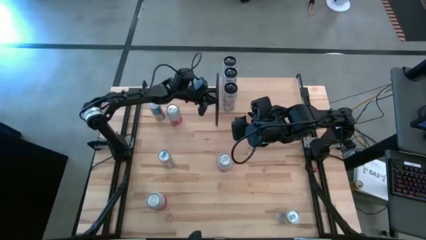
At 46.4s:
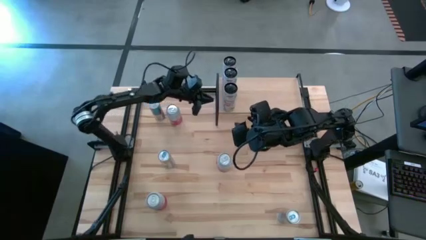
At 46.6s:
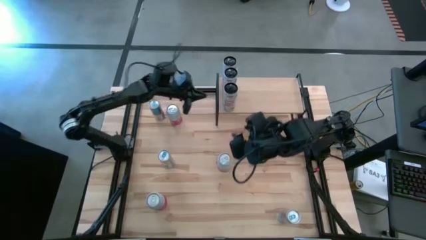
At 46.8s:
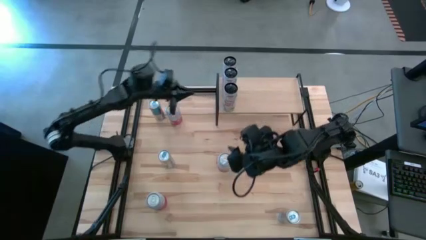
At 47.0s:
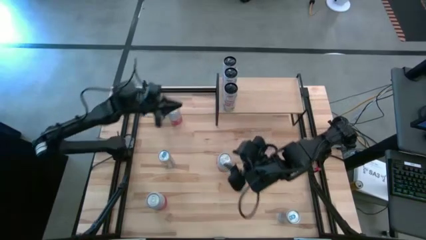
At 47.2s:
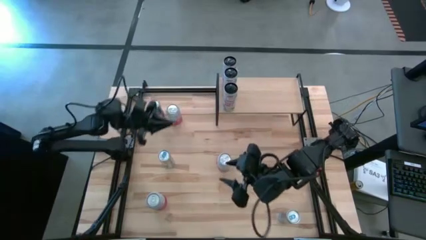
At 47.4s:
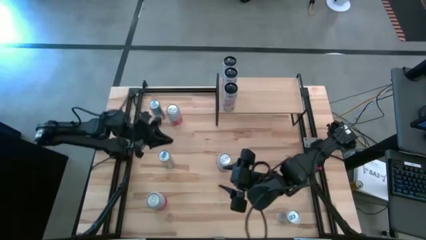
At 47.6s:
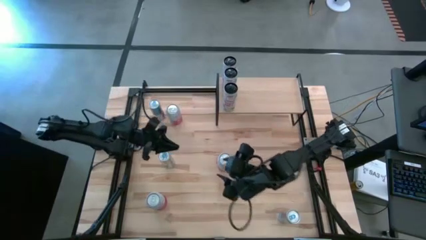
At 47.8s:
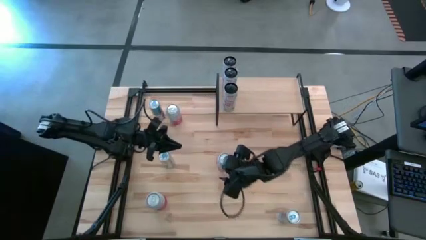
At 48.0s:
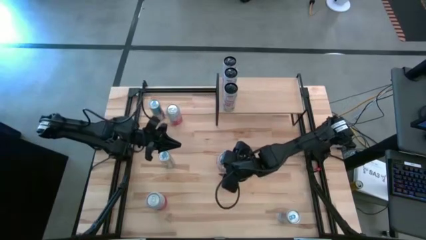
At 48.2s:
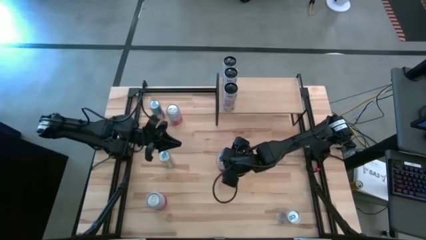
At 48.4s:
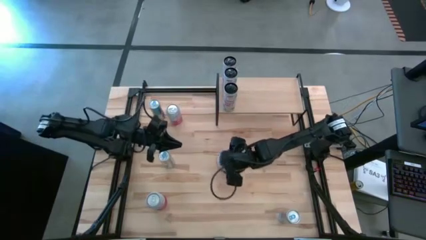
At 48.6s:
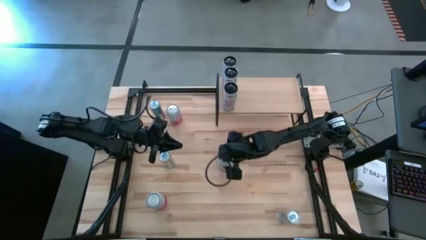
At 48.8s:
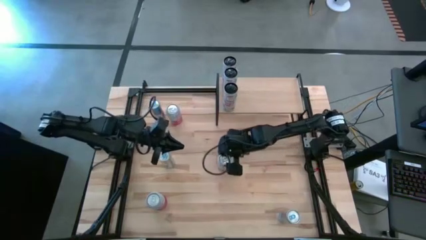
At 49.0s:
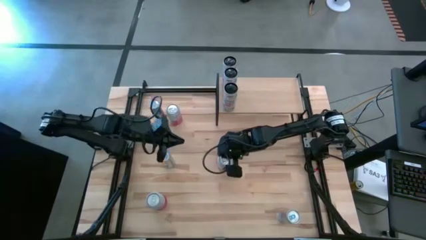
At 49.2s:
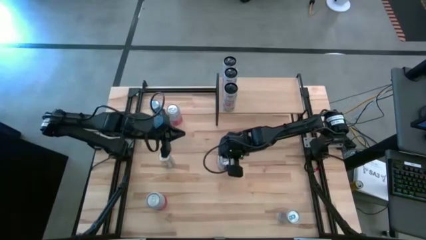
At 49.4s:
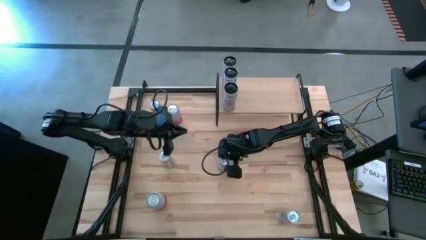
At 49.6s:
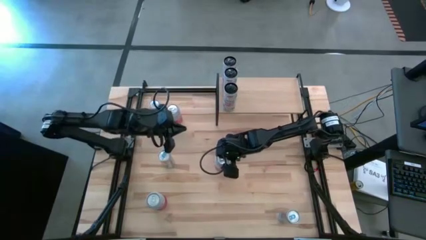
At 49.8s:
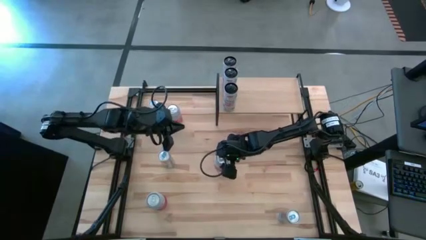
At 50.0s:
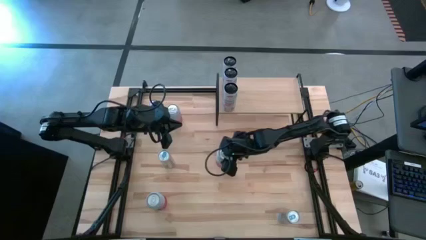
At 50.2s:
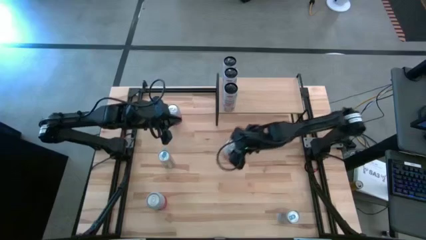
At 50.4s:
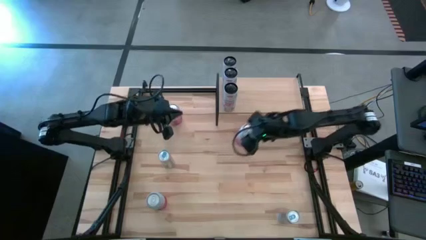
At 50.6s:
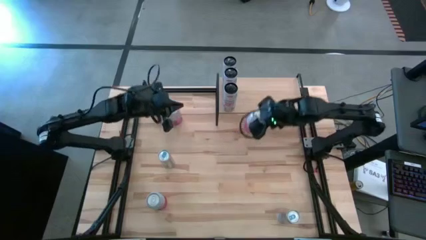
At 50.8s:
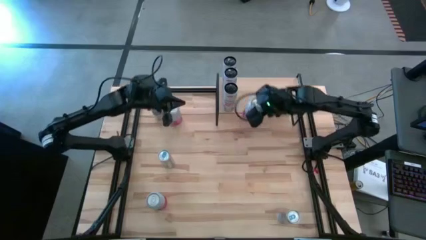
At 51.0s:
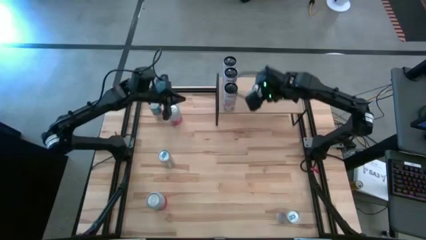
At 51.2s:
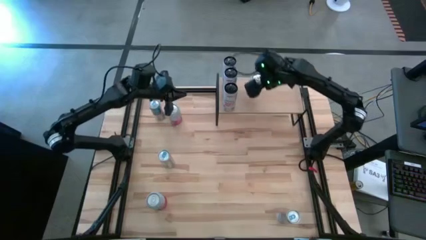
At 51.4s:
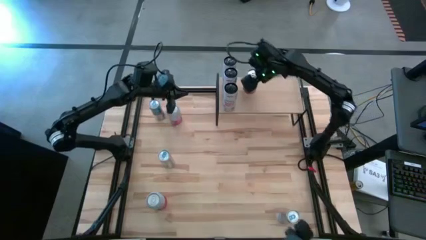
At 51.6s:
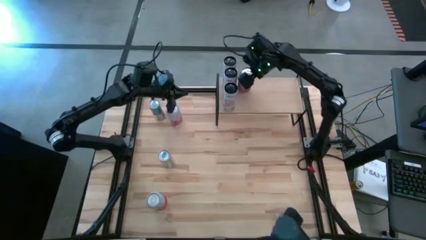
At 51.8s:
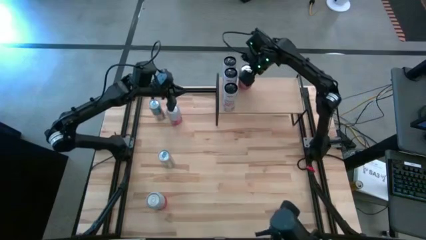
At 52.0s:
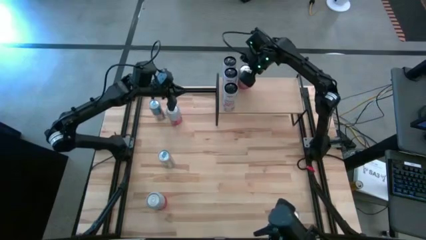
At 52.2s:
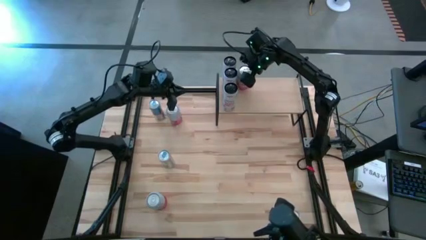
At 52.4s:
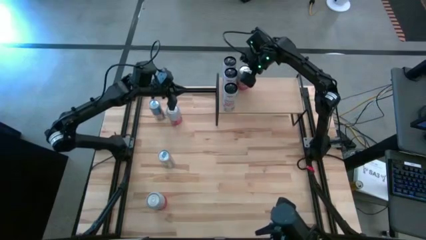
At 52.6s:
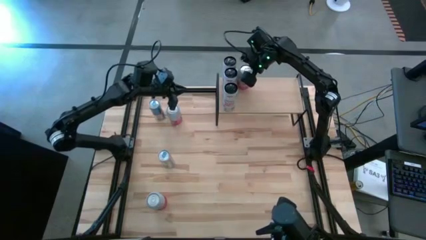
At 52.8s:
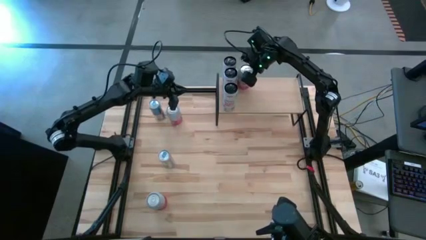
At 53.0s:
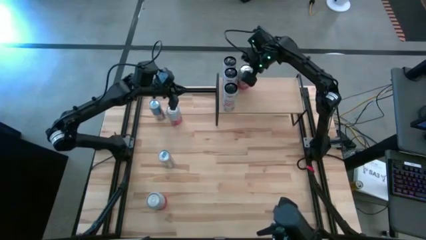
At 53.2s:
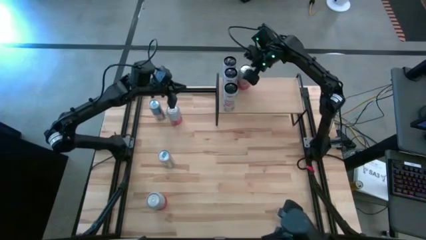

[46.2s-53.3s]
Task: Place canned beverage on shelf
Put the middle pink-white soda can on the shelf

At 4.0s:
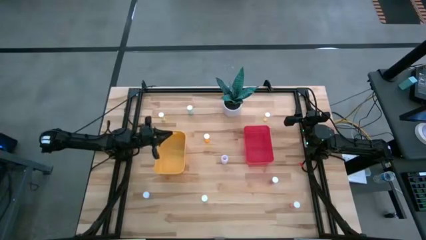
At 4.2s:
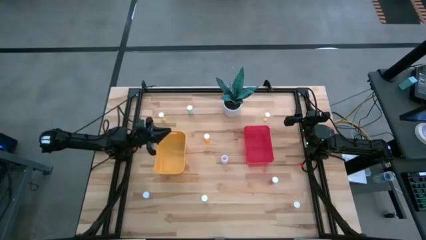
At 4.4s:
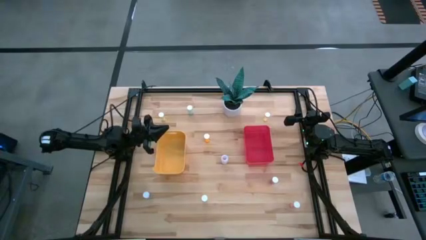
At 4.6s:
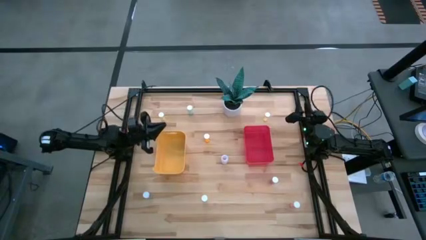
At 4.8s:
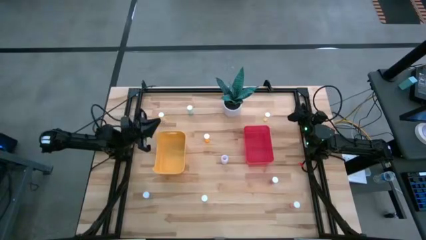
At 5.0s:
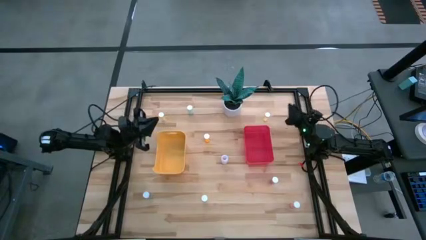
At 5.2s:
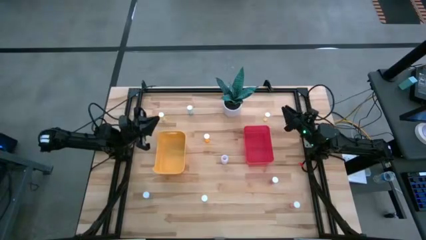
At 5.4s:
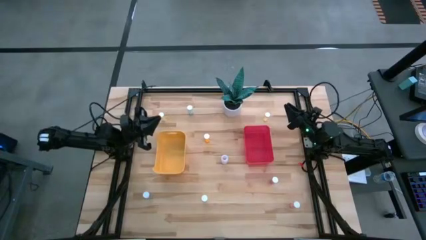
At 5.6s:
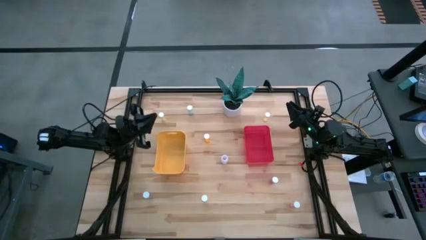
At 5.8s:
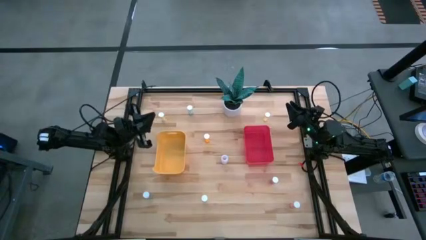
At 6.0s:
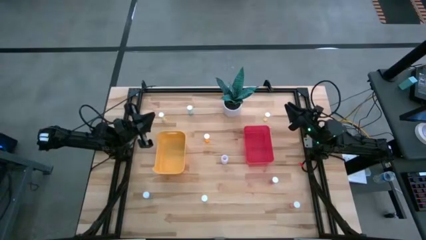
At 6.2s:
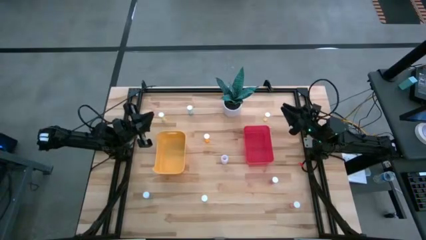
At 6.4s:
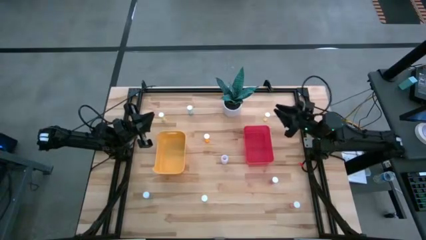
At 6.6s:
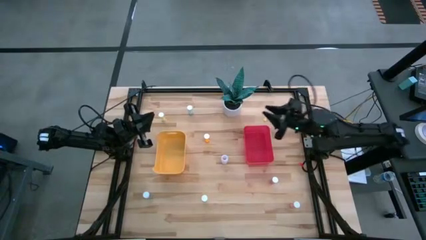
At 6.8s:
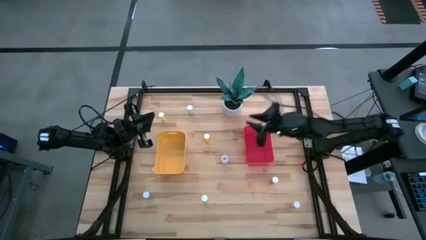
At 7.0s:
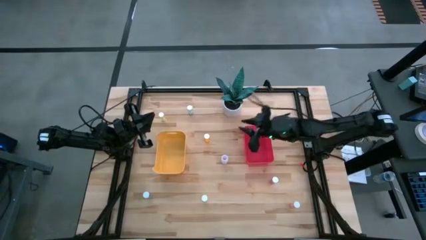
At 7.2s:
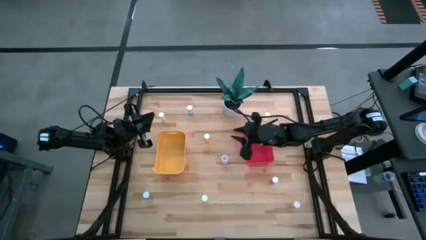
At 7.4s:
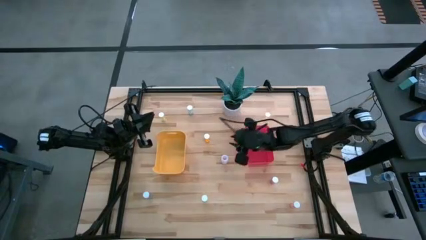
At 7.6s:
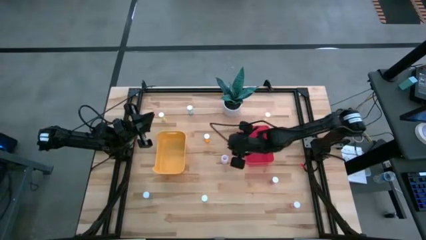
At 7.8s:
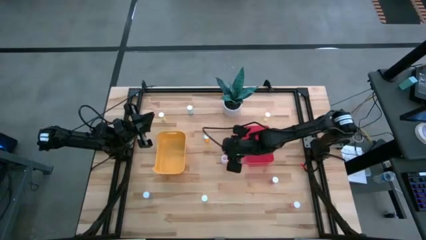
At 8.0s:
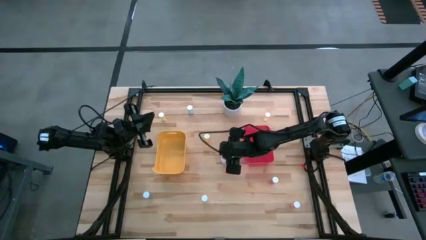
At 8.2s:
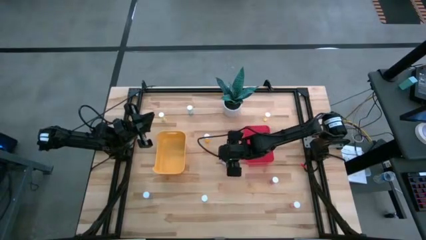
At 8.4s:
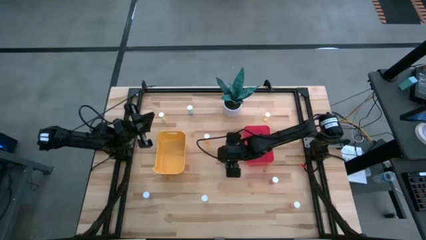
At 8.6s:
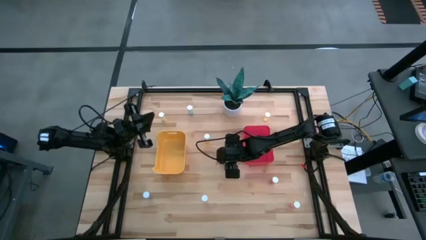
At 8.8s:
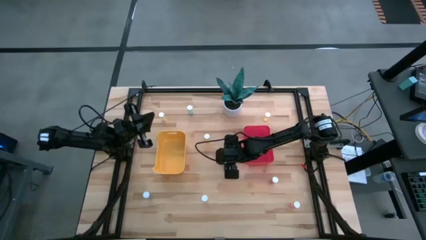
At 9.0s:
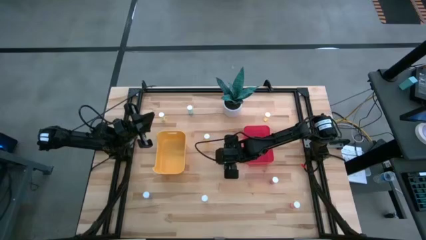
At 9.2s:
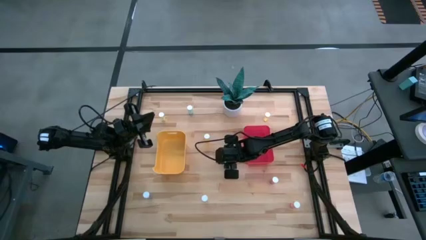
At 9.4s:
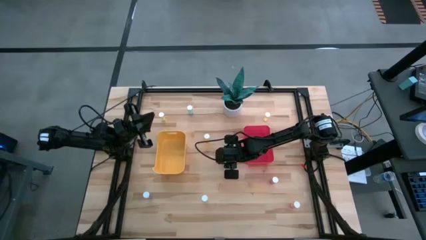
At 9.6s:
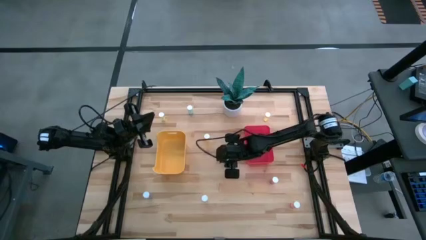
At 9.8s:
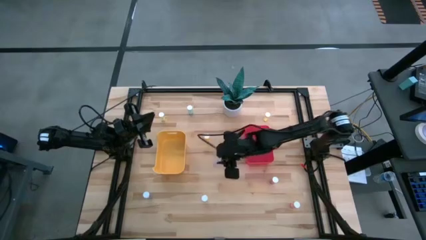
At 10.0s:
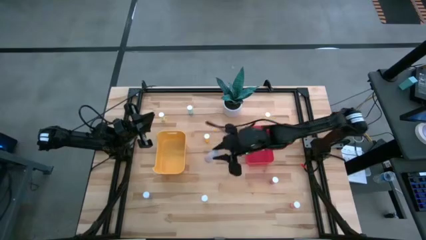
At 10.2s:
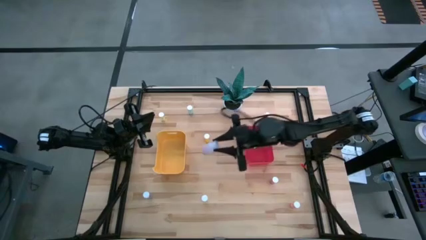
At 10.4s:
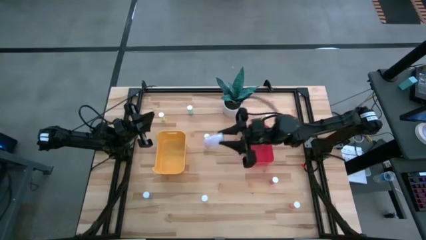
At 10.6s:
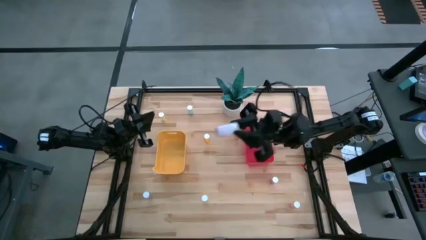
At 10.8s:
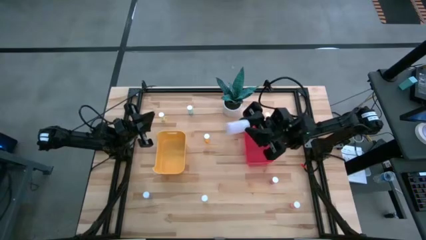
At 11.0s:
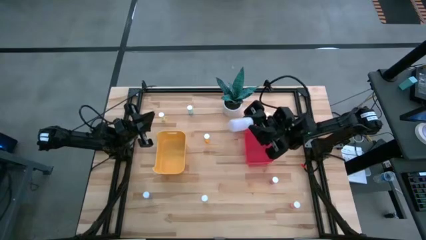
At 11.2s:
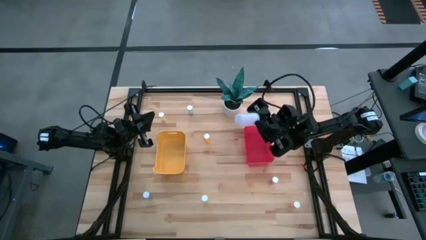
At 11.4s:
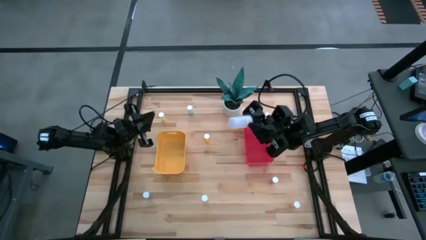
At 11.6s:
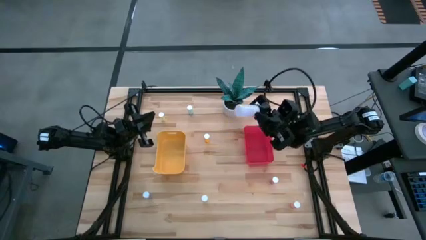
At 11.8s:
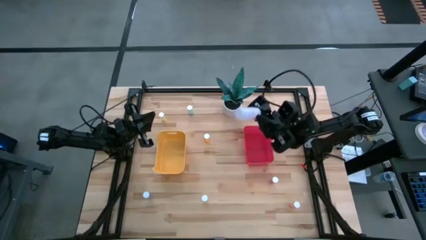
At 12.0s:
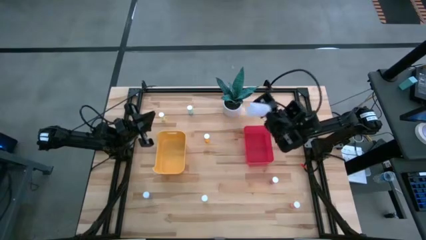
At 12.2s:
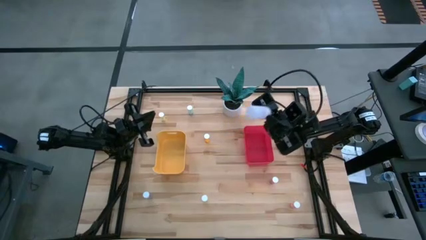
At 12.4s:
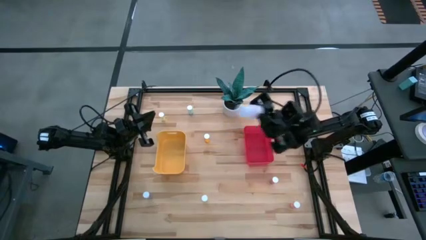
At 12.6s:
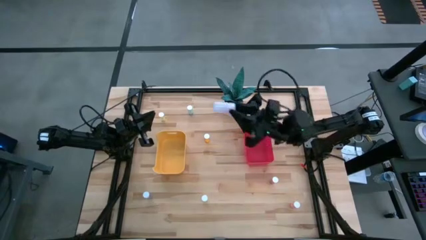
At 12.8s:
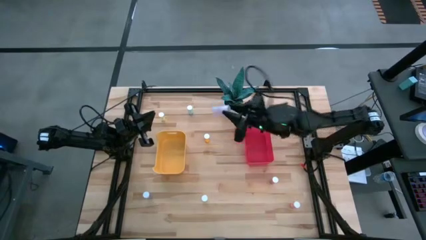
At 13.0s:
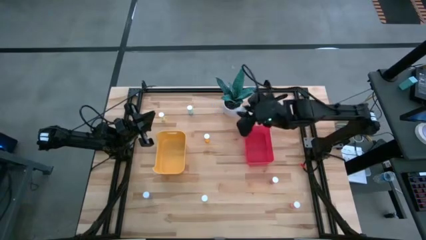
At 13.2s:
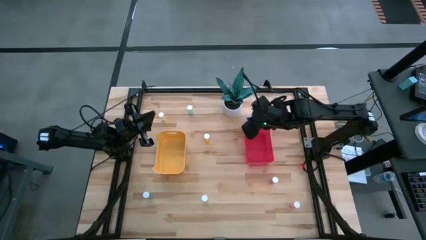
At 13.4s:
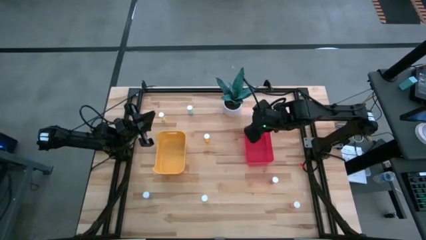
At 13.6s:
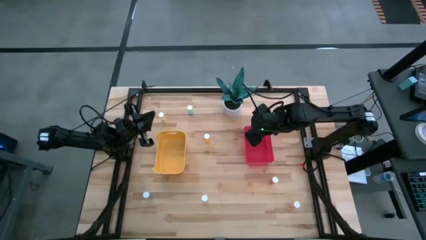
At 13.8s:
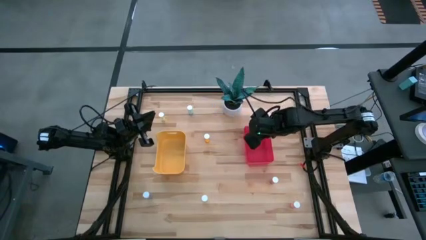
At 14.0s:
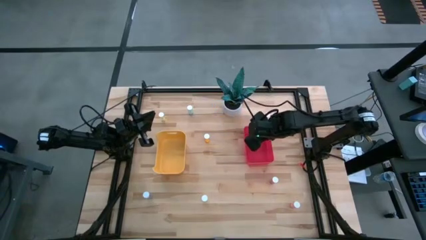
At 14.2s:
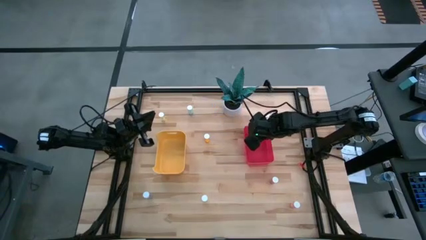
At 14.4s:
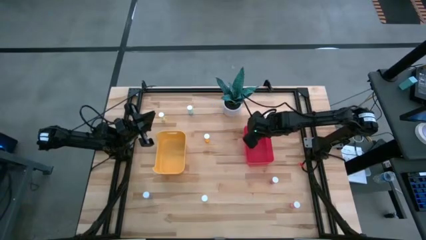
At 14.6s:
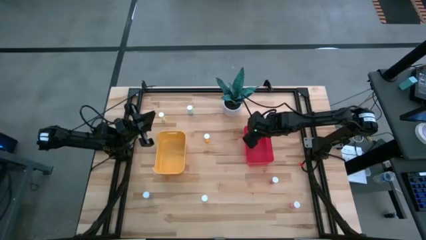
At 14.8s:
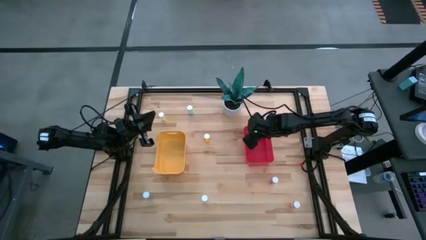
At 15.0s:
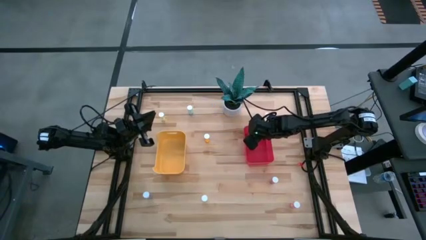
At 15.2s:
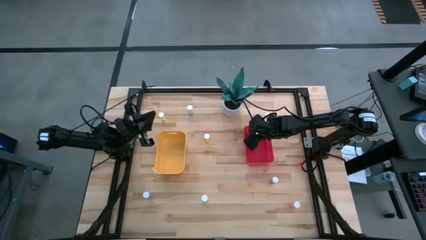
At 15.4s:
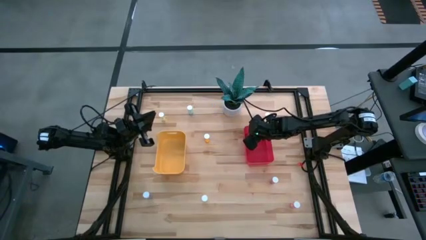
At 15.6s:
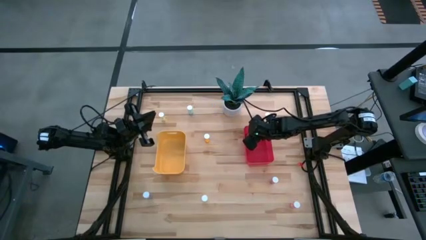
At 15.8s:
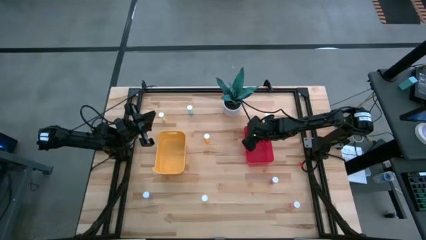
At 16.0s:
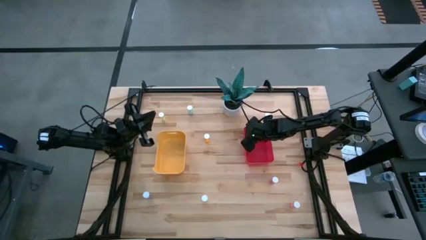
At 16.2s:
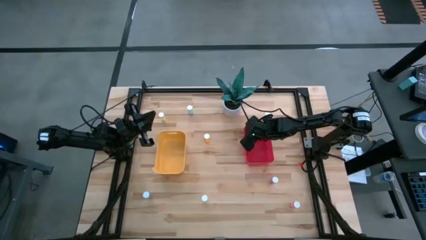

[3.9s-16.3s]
Task: Pick and place medicine bottles into bin by pill shape (circle, oval)
Put the transparent capsule bottle into the red bin
